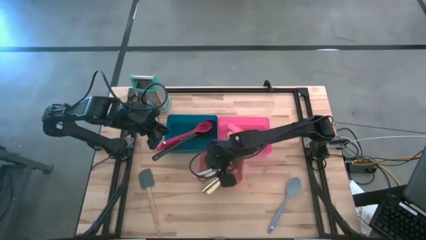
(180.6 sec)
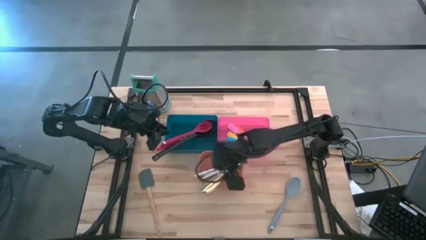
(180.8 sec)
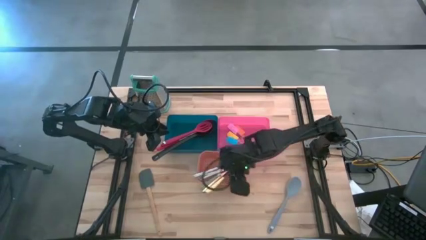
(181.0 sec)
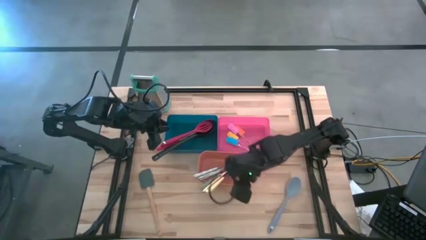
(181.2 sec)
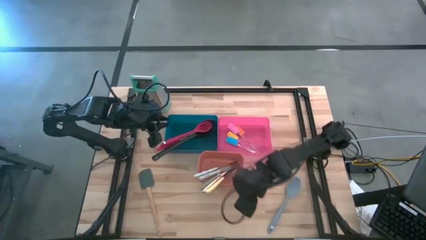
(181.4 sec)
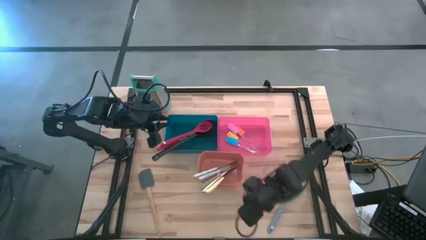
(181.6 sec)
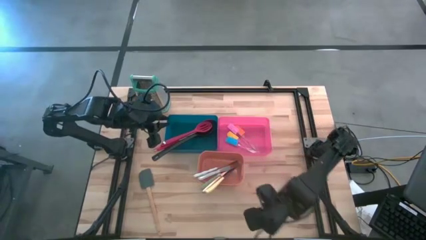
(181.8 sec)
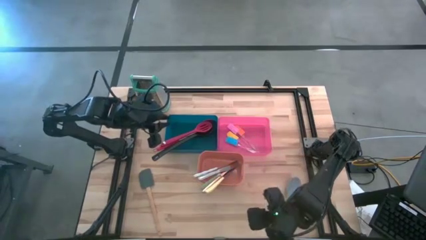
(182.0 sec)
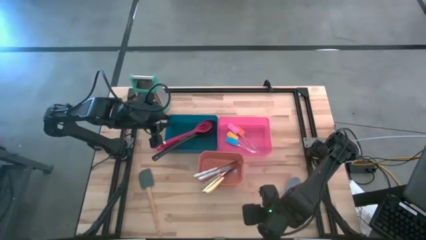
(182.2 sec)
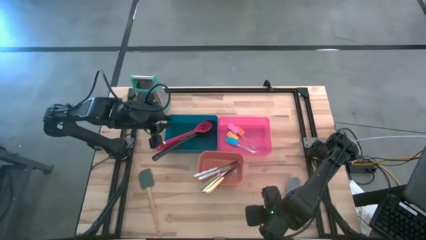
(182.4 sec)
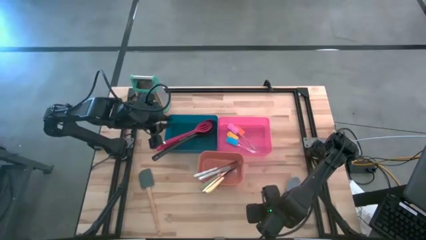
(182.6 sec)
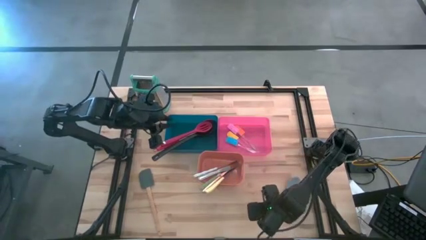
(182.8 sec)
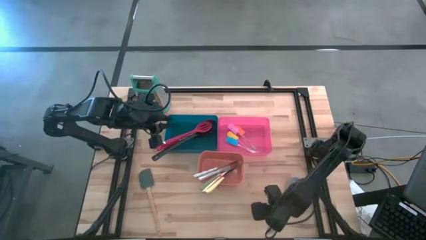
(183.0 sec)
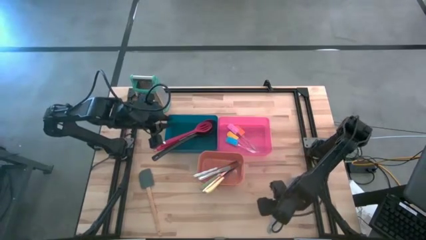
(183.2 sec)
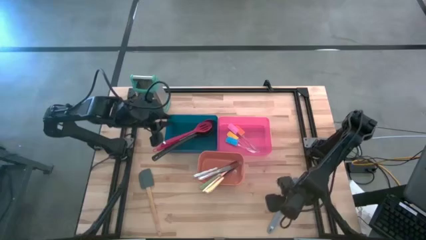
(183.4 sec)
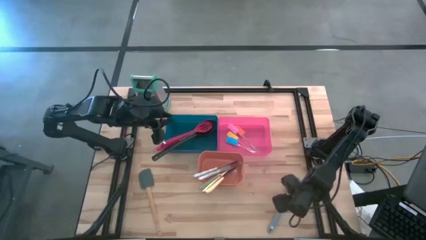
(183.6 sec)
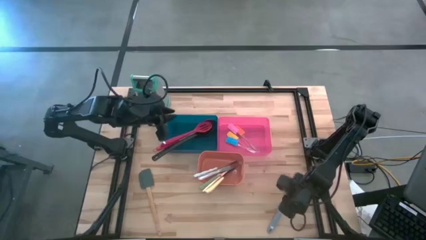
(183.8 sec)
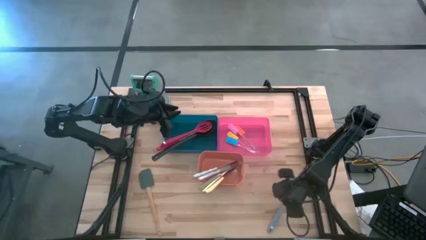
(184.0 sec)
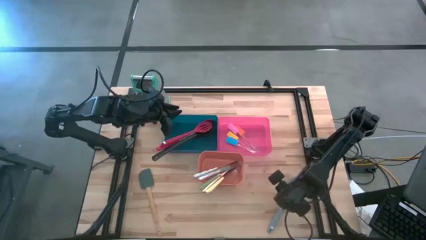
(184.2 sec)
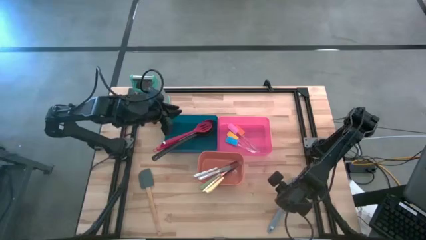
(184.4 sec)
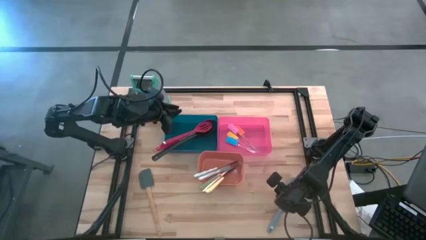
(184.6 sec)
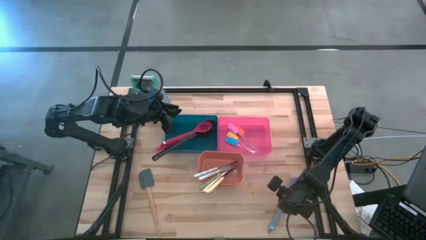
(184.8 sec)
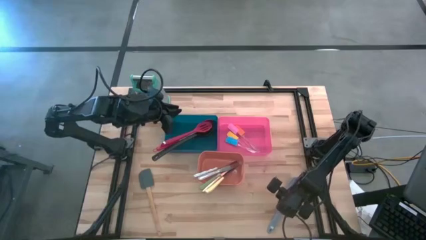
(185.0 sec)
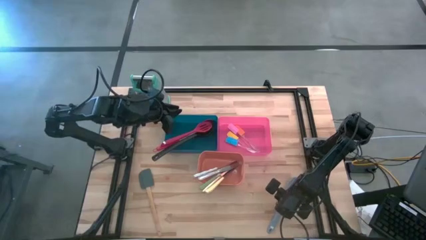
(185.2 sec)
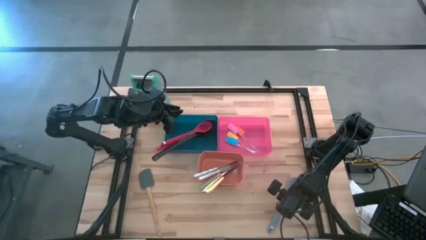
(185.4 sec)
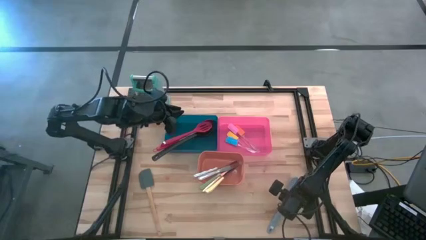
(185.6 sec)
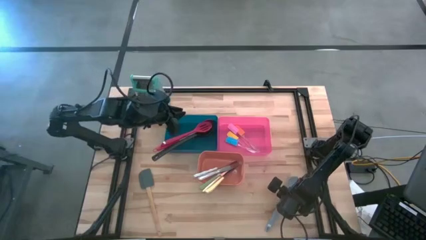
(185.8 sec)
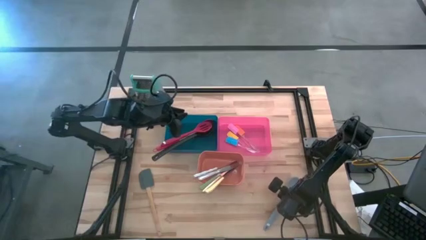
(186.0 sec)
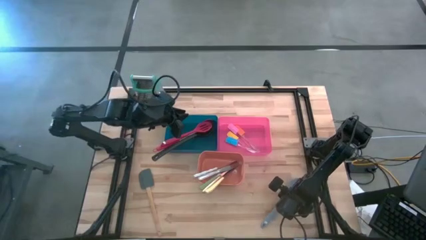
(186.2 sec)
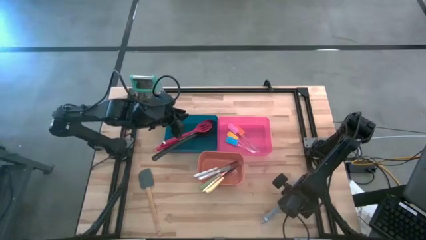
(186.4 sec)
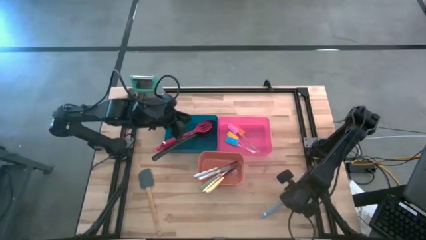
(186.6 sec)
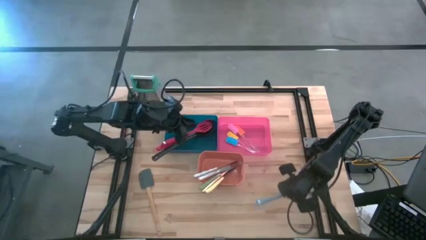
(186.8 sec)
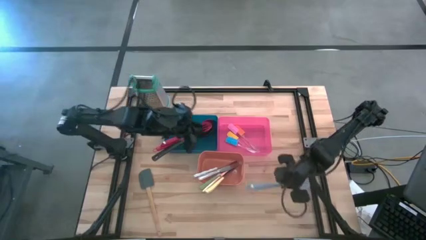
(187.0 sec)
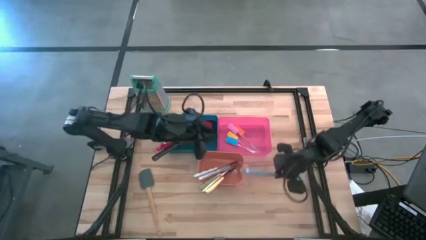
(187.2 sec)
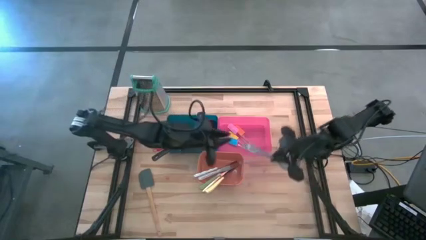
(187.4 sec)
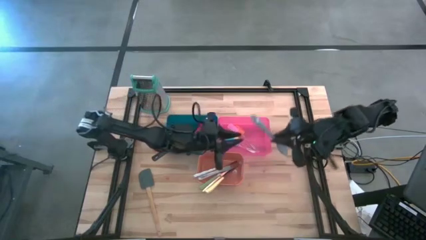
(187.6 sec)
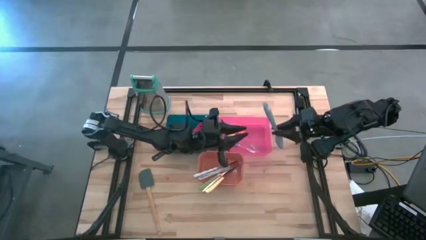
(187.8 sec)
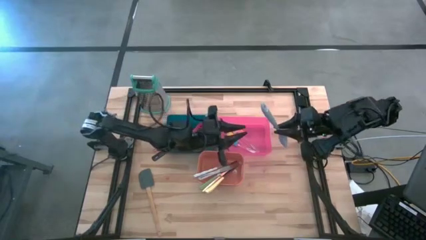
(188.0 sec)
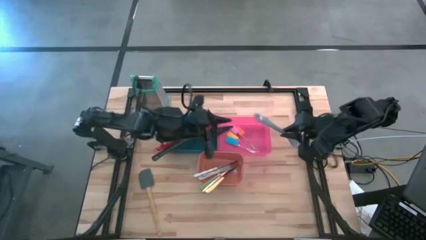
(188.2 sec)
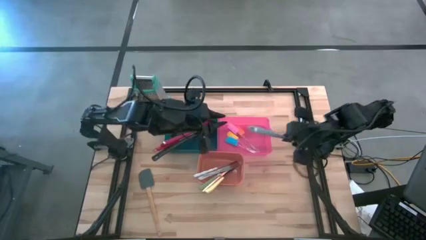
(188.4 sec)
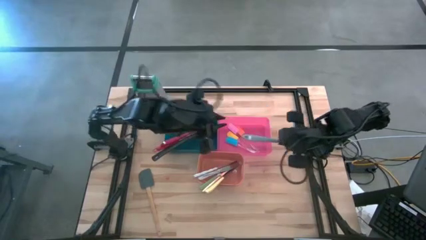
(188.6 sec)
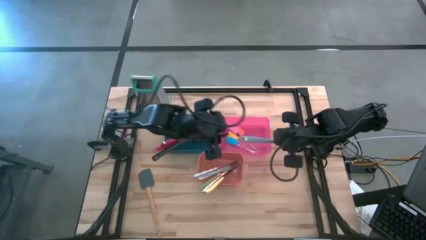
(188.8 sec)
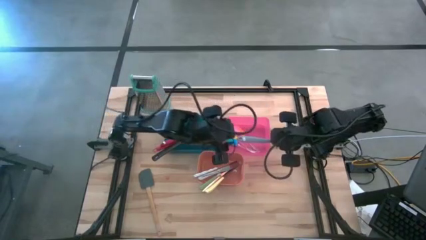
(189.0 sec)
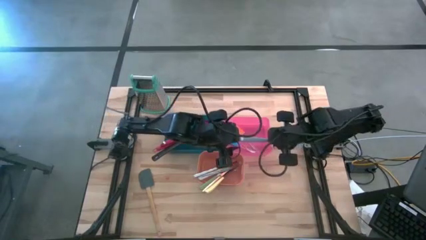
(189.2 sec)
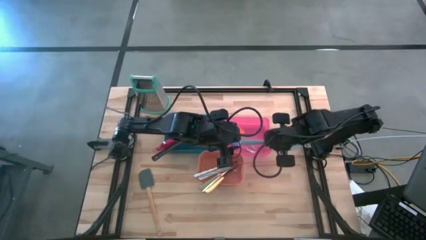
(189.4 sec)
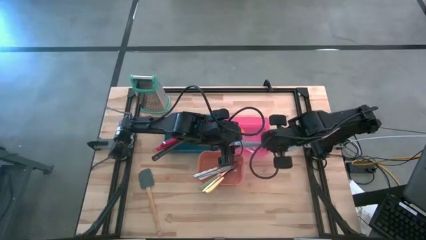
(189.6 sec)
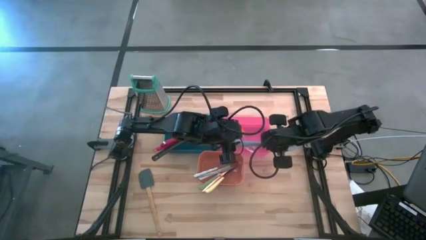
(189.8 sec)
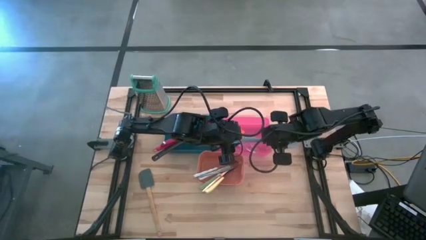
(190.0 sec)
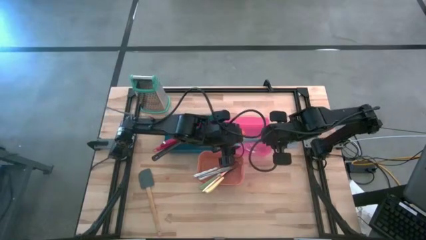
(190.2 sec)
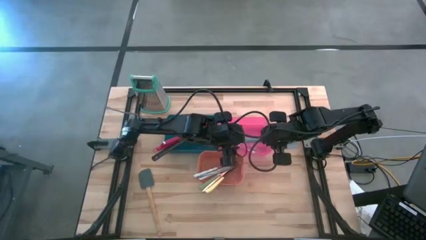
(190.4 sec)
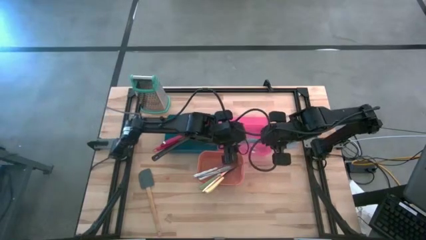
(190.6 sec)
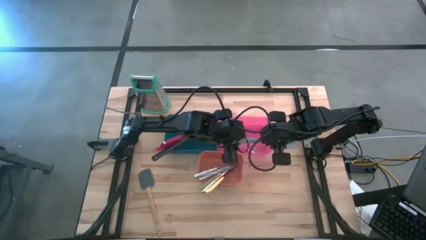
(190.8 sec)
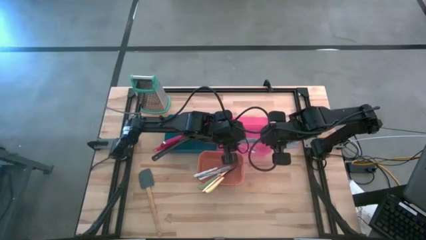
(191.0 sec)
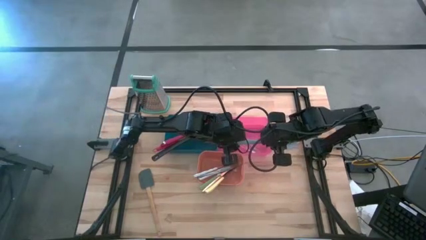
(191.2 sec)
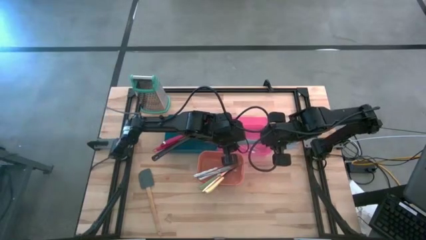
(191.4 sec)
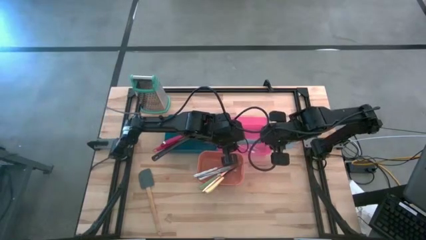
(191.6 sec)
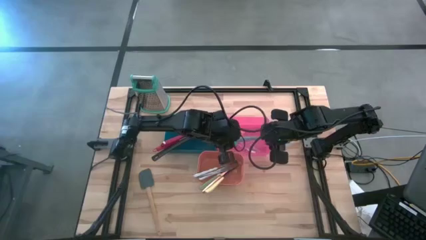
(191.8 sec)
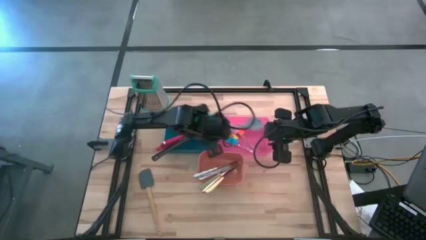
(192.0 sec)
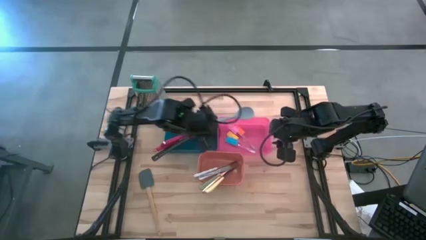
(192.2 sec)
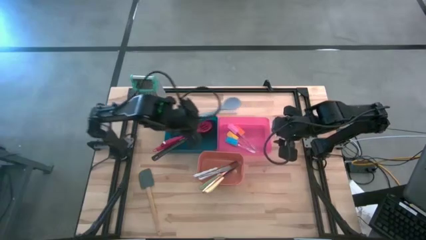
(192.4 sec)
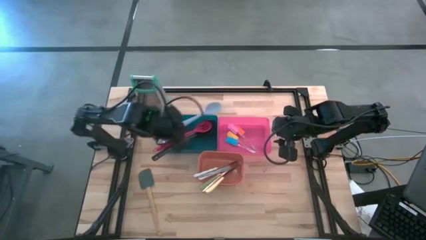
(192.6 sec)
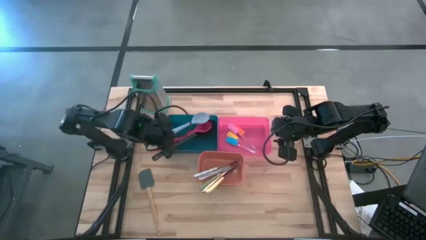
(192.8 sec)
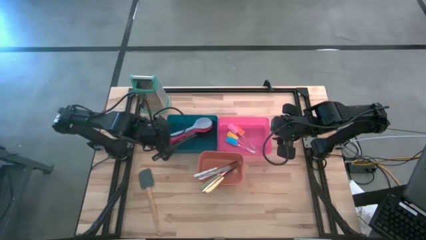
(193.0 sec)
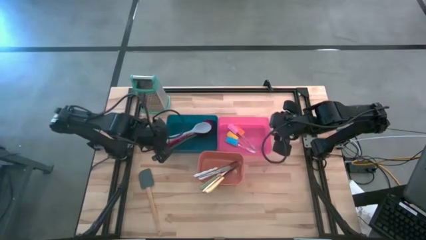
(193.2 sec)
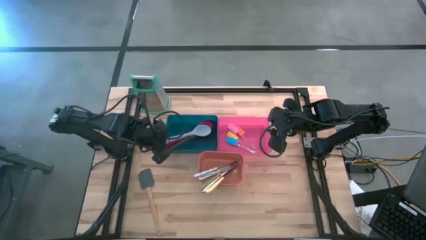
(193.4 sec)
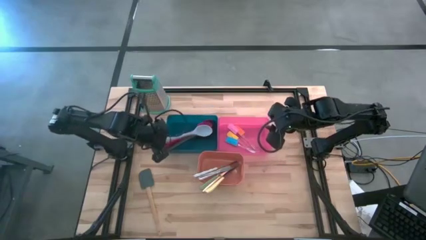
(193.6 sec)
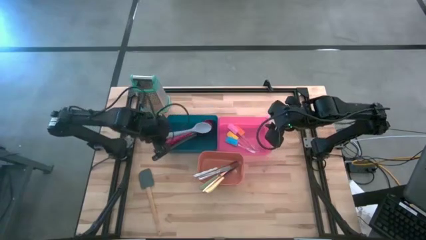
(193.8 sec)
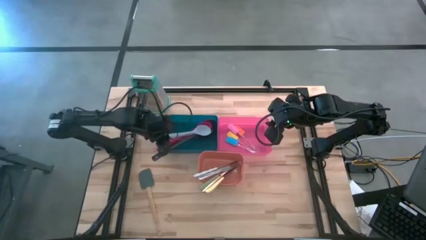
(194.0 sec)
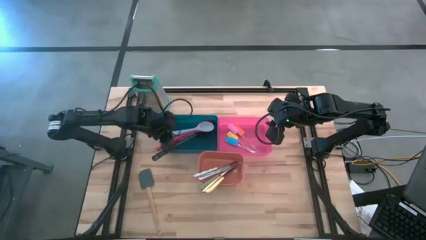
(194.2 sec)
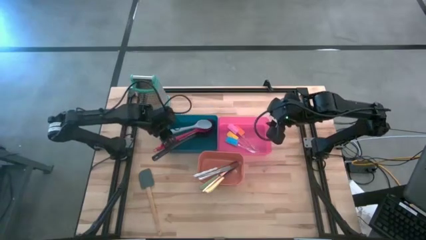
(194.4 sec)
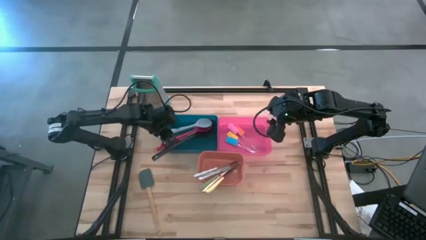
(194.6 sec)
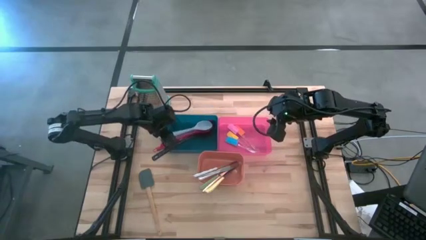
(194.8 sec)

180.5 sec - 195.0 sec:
Task: Pick & Place Kitchen Items
Put the gray serving spoon into the blue bin

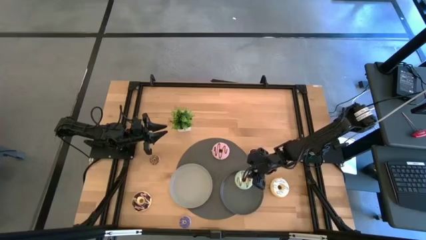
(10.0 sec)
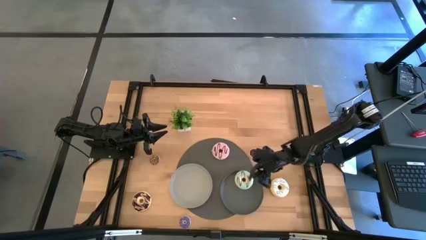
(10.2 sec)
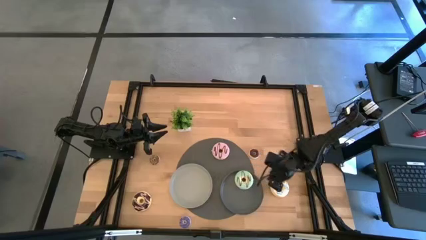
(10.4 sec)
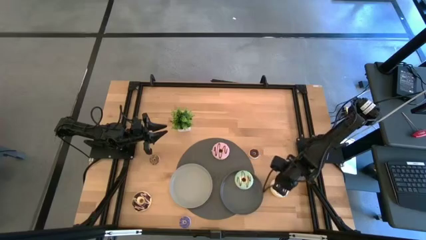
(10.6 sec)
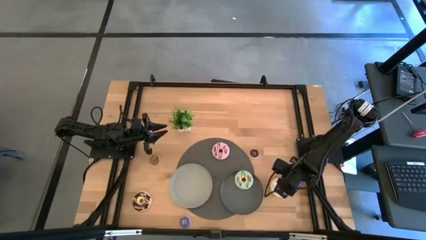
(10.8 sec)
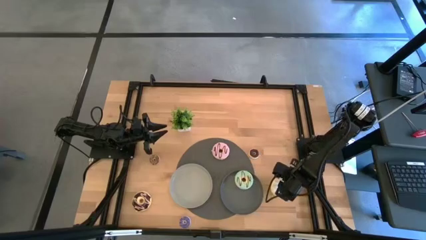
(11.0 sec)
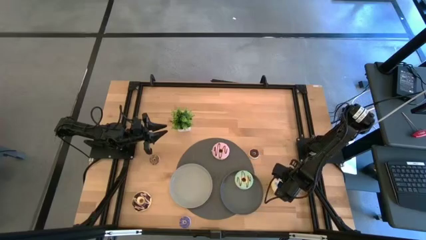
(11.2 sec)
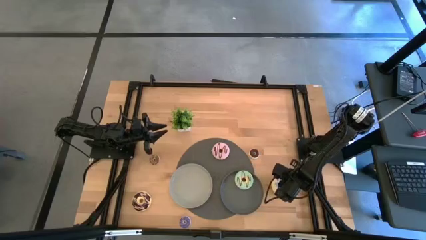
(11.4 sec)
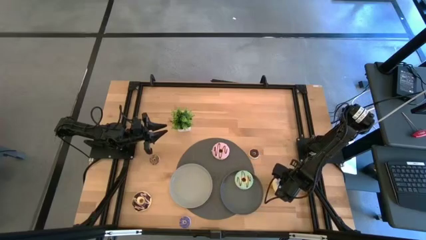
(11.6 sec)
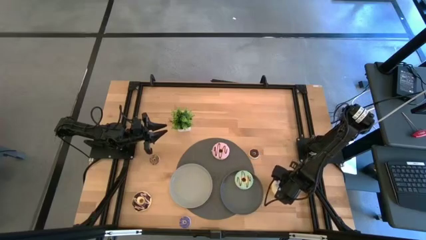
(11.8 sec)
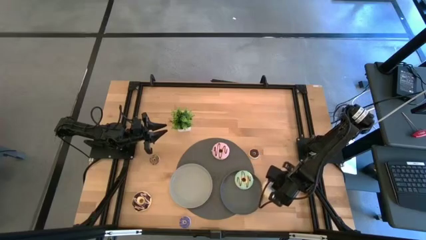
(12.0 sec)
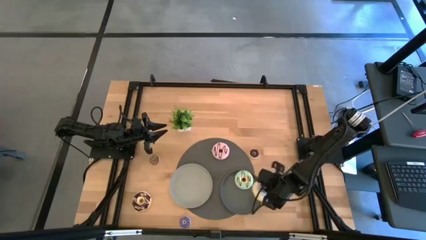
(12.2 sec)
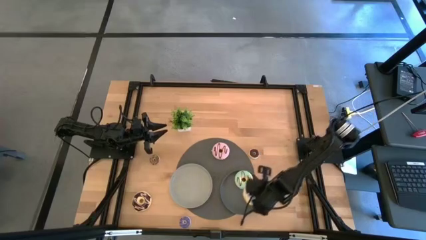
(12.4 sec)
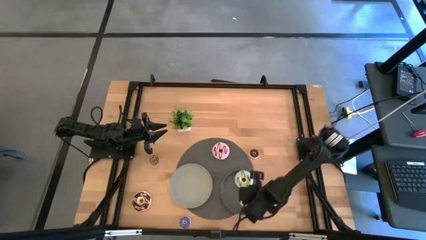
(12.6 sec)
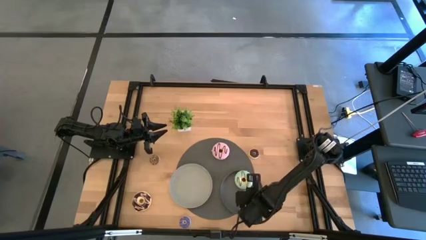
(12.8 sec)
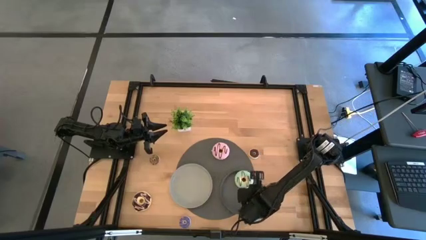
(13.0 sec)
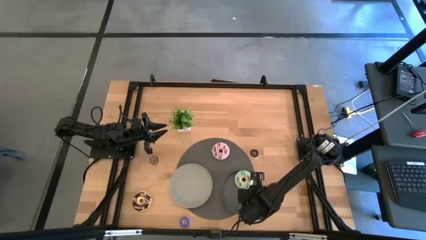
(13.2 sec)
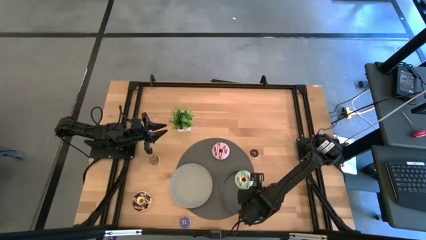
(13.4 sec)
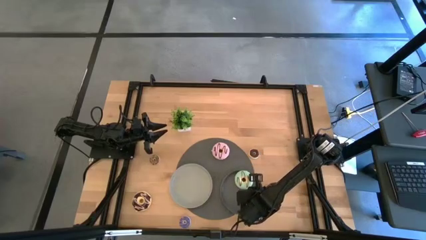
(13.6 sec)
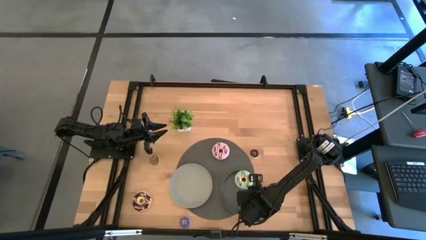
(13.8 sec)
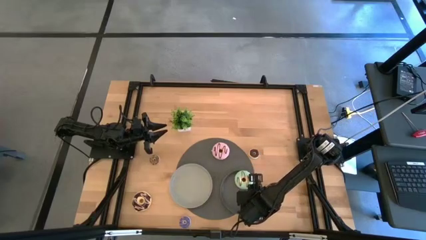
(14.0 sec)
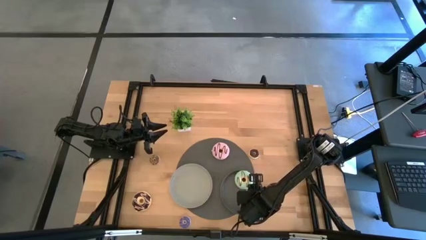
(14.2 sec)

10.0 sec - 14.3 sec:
Task: Pick & Place donuts
Put the large white donut on the dark grey plate
